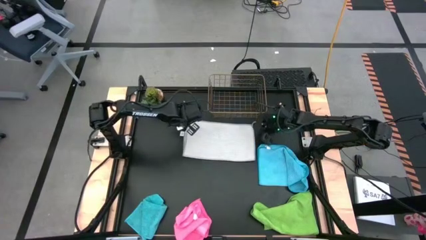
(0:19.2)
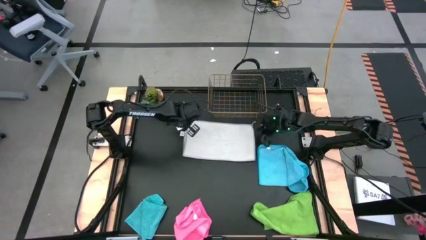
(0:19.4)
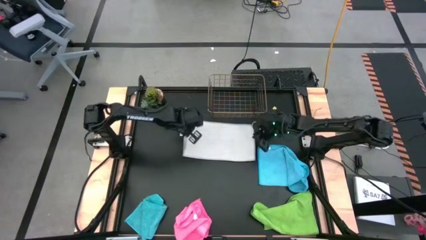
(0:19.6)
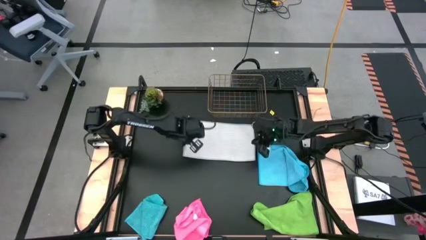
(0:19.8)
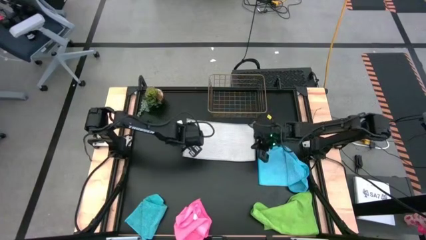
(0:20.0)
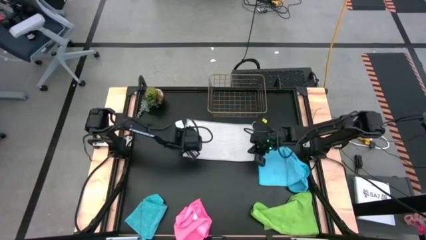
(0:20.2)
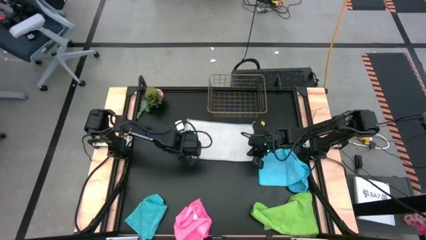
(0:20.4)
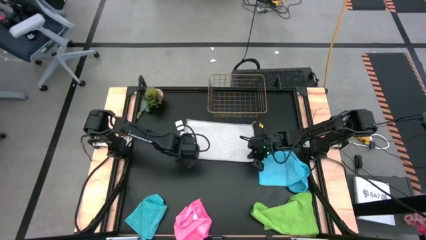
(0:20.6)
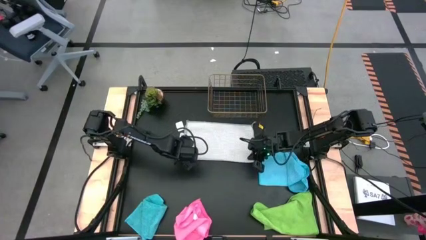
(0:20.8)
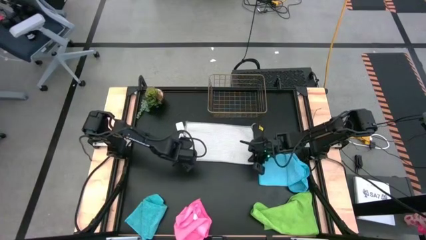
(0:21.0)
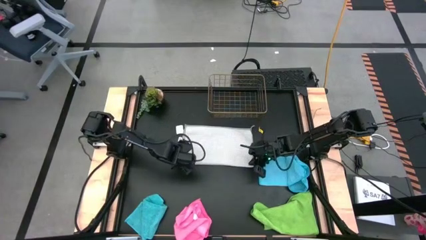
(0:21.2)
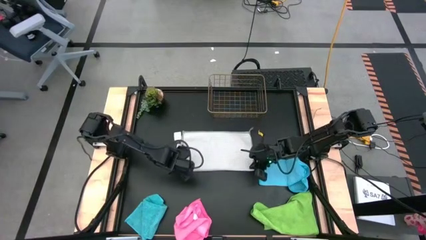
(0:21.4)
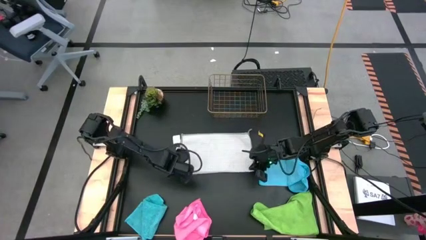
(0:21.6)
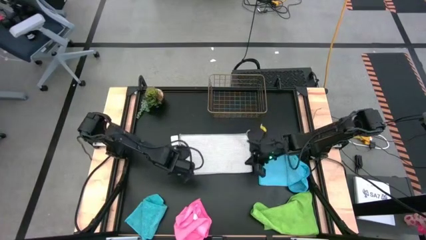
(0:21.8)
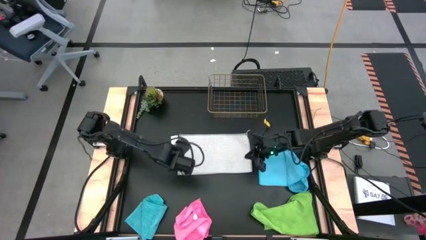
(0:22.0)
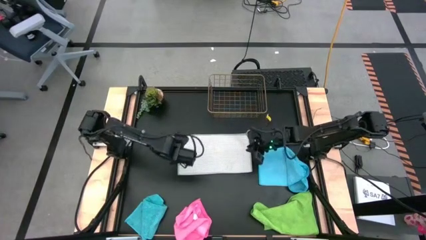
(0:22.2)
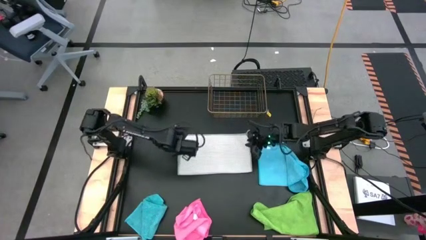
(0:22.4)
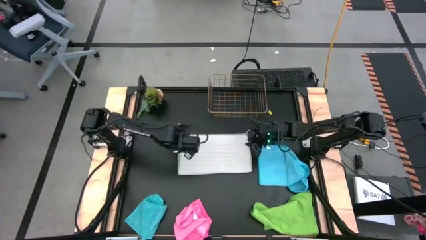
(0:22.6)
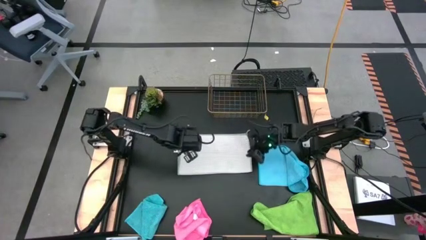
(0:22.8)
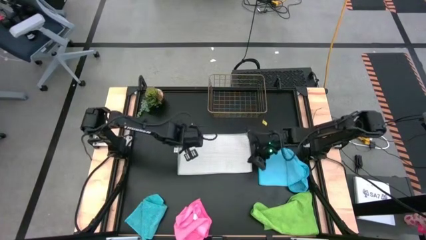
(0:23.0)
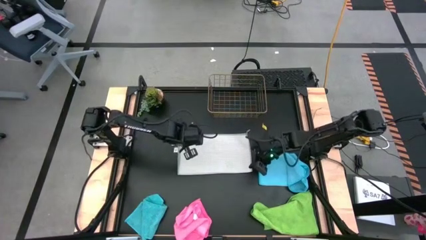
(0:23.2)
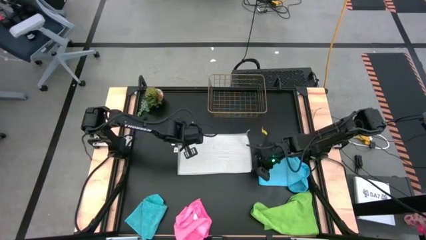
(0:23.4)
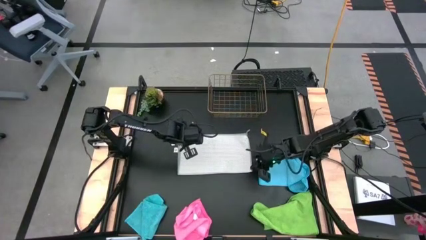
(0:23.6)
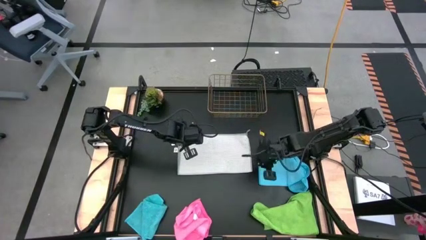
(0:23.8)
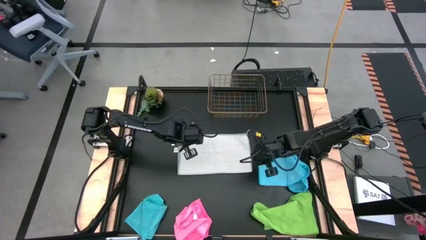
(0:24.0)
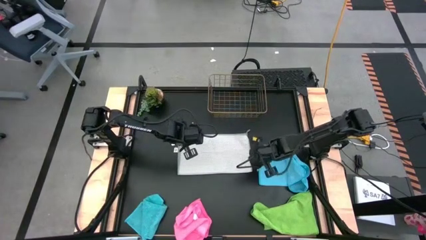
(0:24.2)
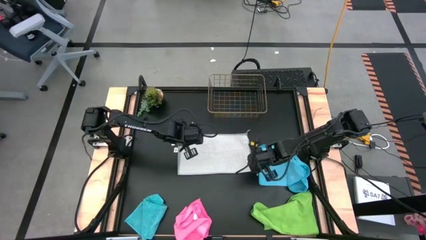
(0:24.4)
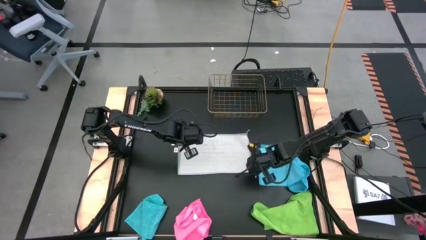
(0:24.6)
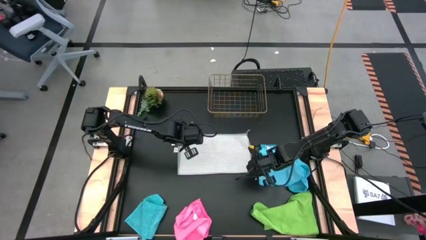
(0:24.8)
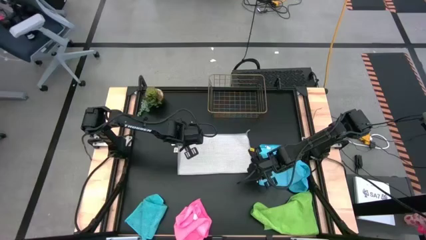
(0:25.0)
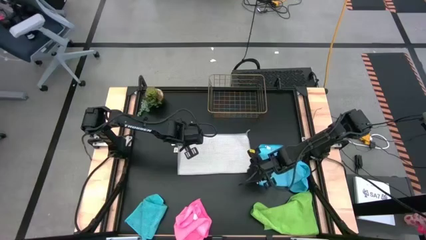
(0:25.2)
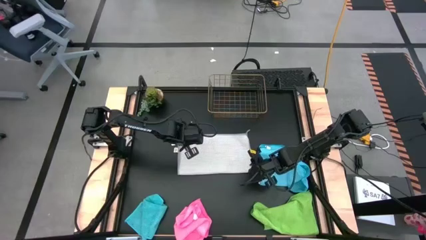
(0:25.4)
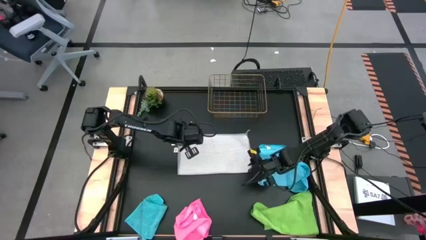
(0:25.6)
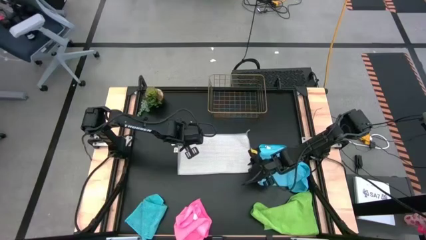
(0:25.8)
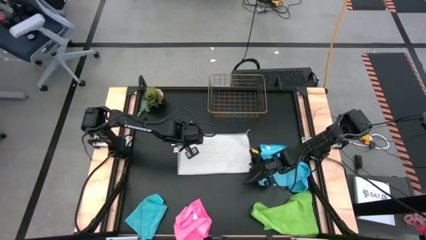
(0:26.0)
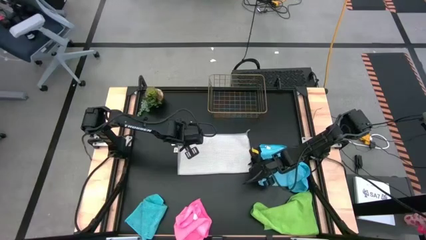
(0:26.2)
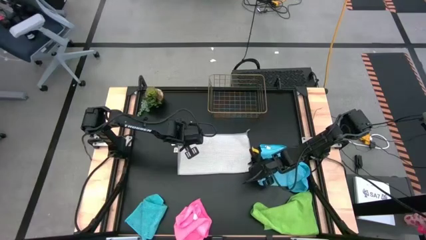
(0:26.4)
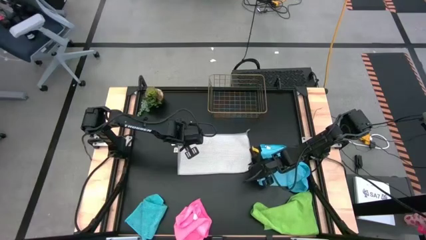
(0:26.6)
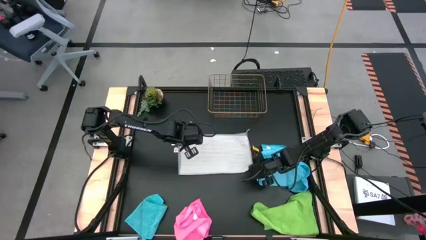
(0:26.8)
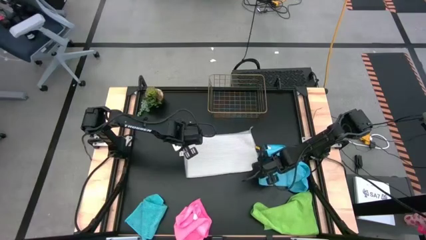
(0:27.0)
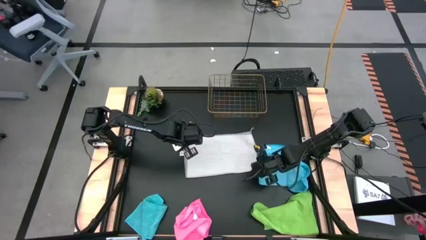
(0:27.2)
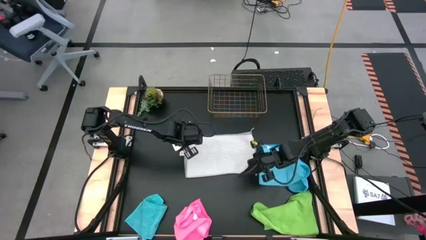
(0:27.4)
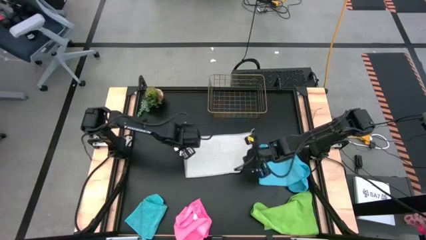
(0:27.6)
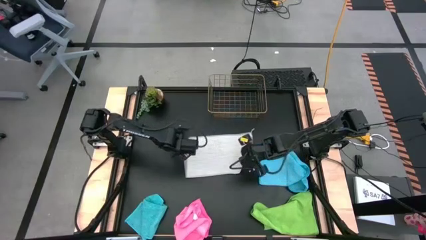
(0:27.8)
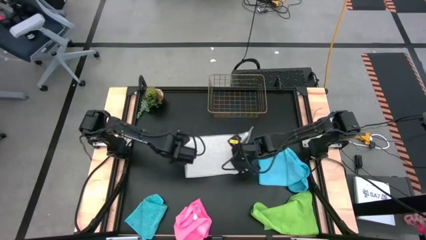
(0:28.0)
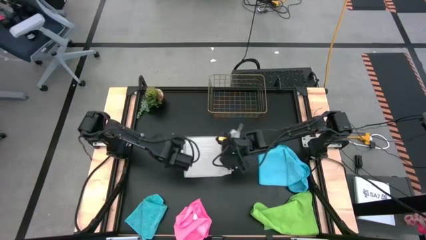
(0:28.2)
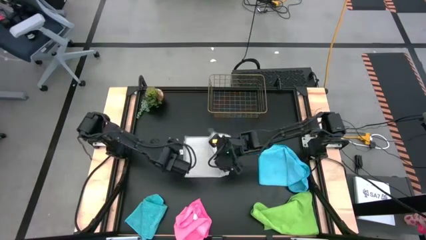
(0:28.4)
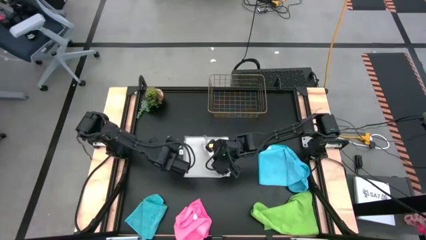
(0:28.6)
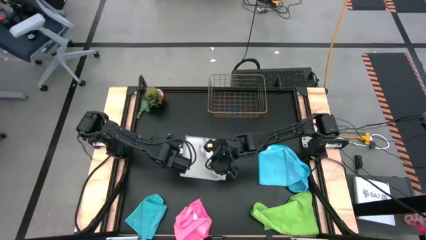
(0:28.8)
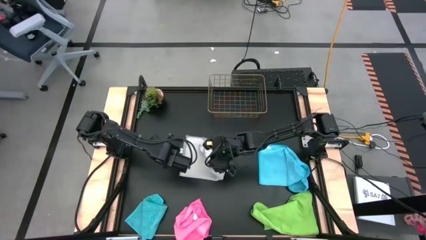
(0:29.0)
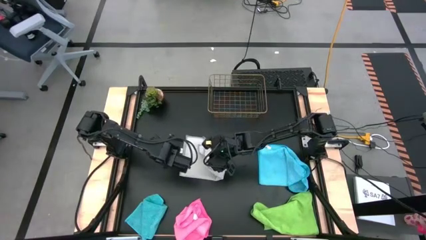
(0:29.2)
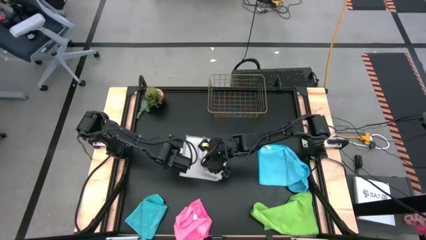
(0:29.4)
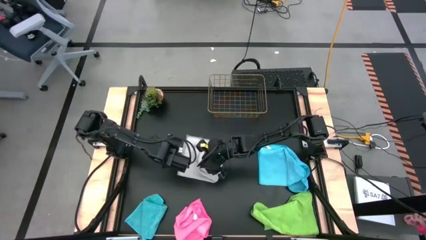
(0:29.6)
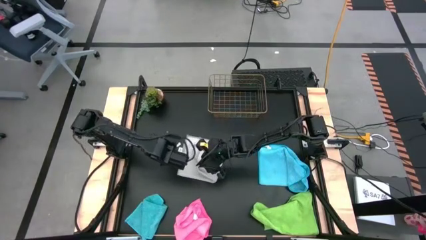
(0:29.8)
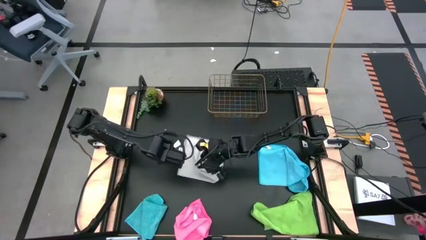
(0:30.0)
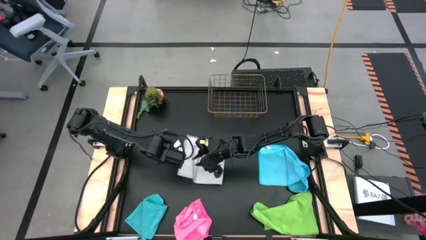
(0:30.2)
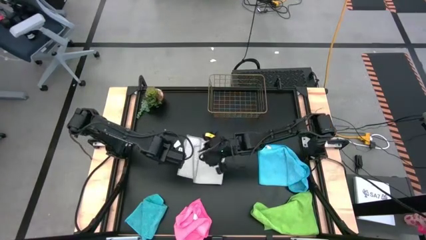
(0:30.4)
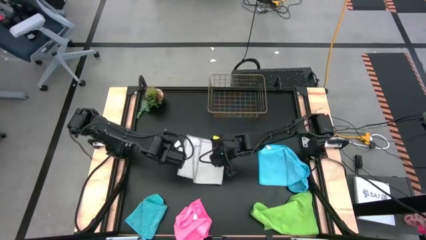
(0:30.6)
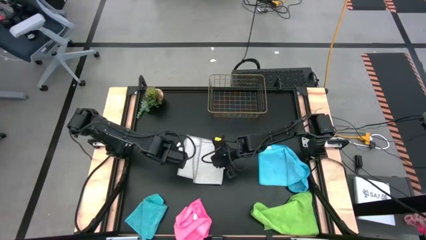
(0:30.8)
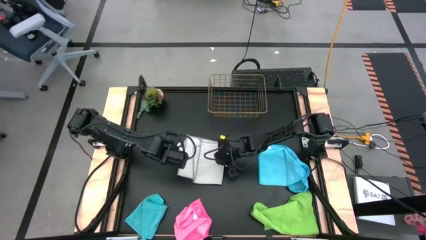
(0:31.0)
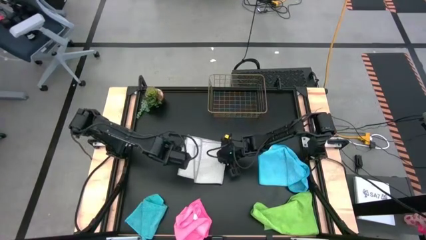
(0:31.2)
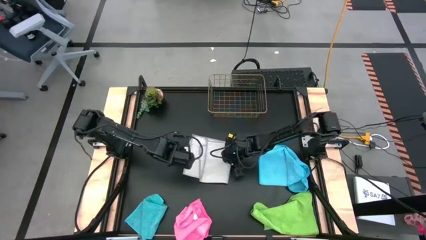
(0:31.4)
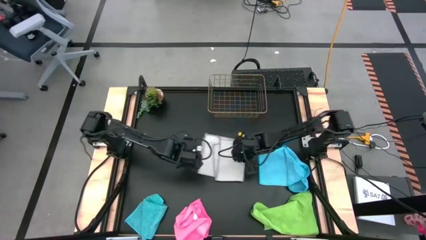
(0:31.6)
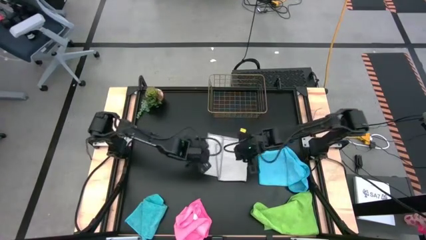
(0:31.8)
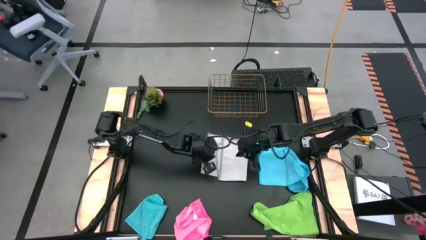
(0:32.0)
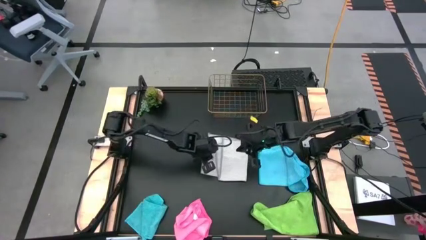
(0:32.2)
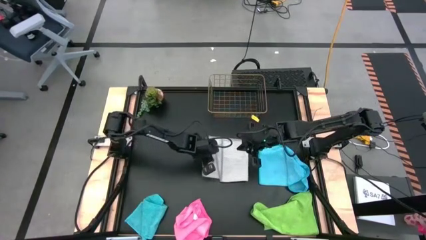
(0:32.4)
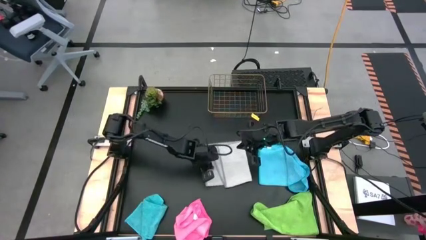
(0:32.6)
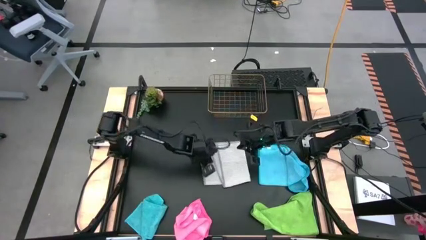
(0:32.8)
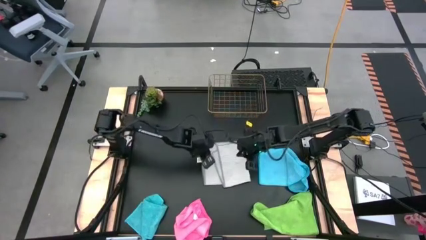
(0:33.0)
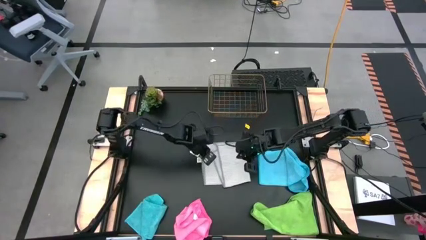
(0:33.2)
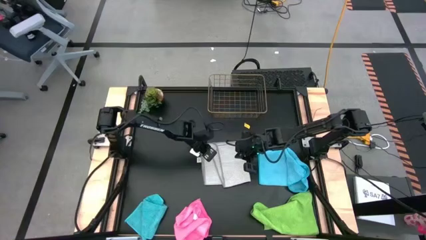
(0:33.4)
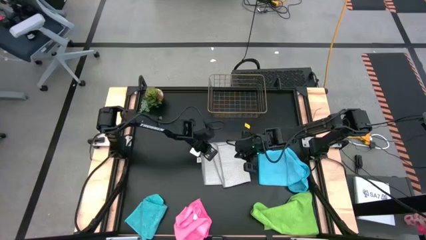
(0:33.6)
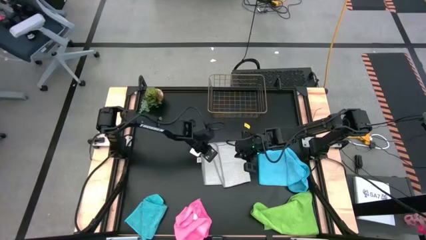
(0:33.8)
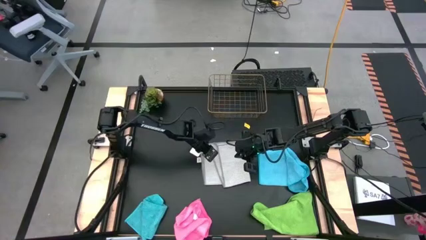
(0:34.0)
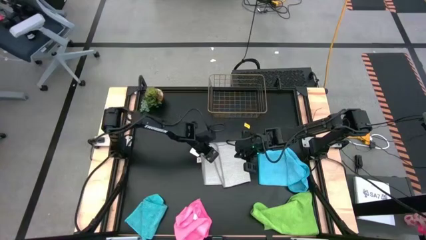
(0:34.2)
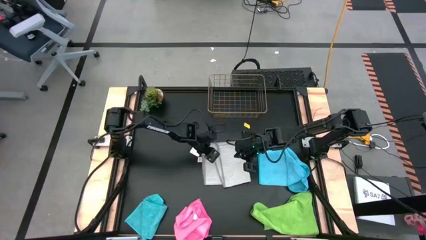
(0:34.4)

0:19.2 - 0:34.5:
Task: Fold microfiber towels
Fold the gray towel
